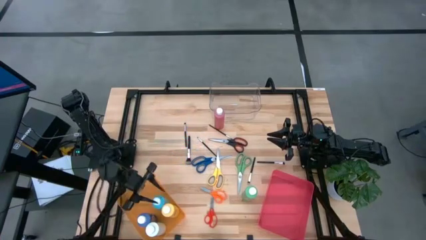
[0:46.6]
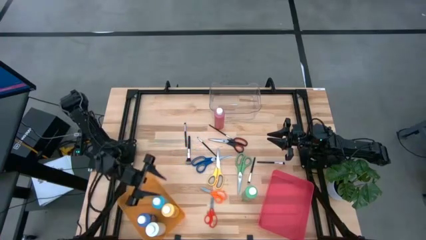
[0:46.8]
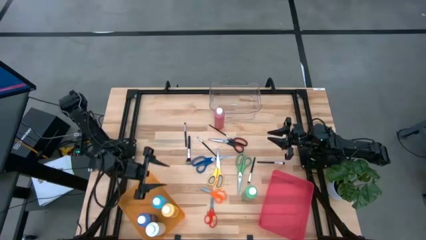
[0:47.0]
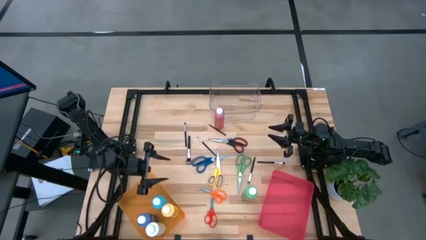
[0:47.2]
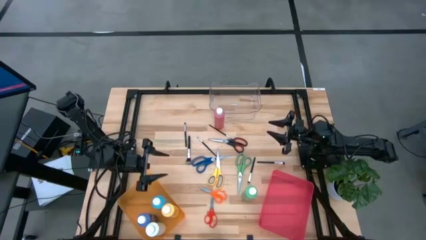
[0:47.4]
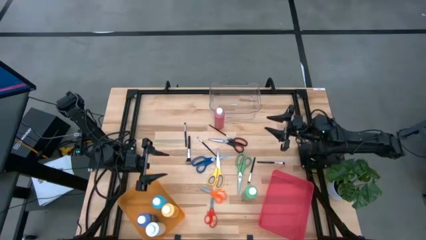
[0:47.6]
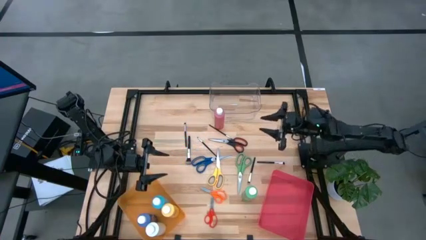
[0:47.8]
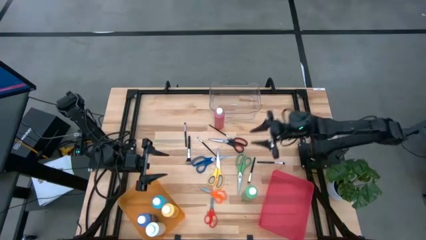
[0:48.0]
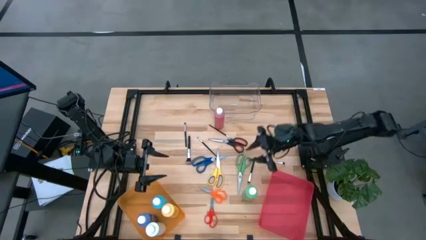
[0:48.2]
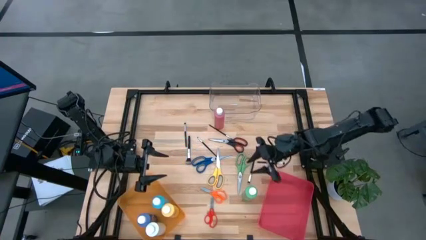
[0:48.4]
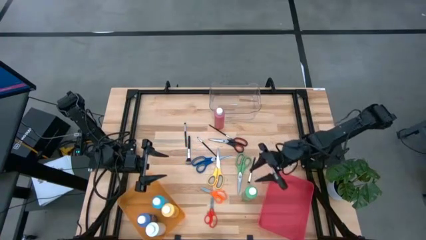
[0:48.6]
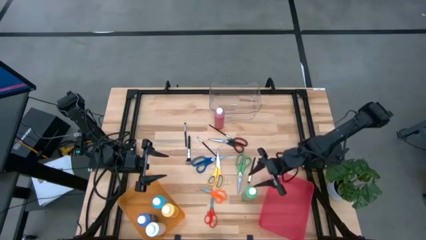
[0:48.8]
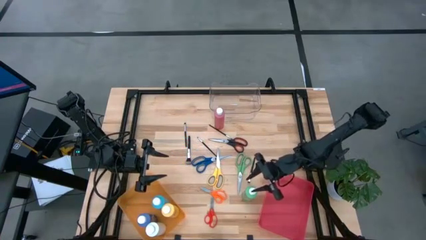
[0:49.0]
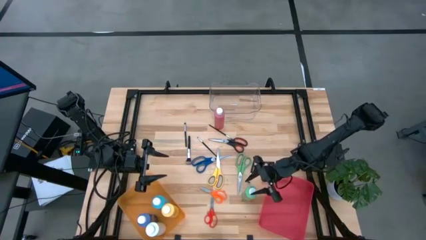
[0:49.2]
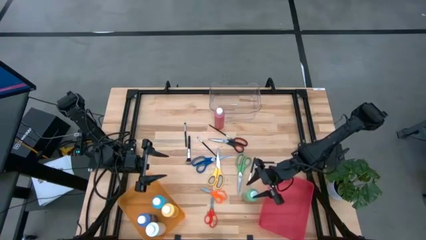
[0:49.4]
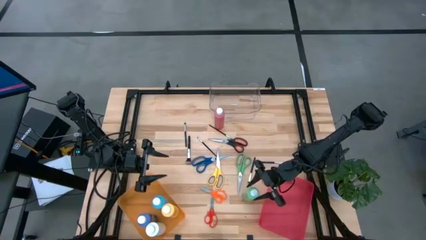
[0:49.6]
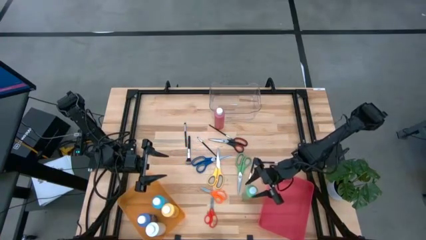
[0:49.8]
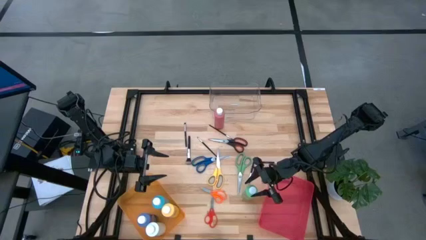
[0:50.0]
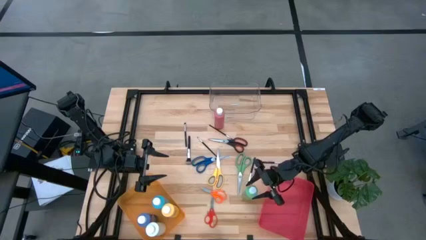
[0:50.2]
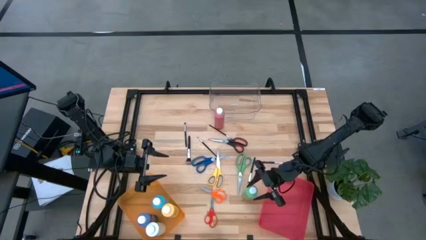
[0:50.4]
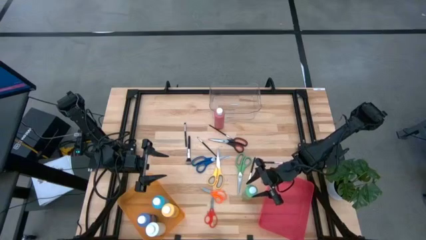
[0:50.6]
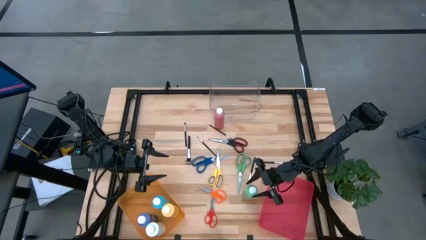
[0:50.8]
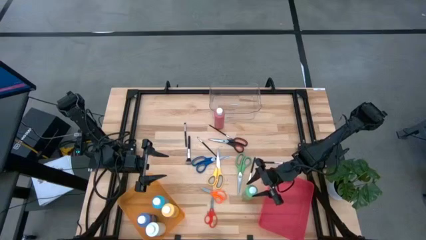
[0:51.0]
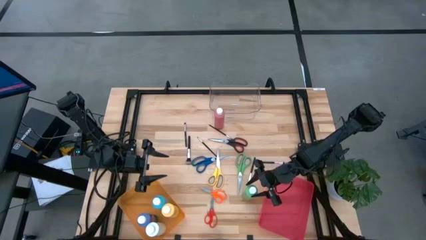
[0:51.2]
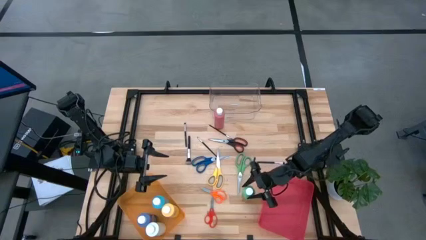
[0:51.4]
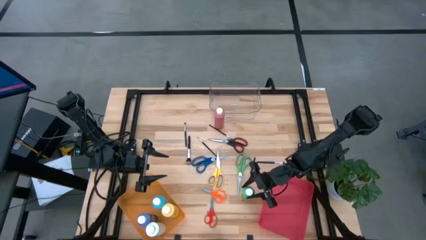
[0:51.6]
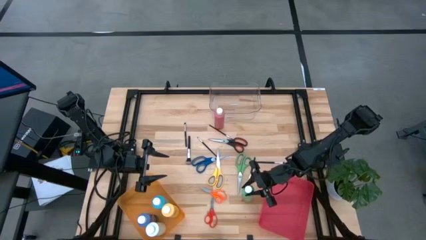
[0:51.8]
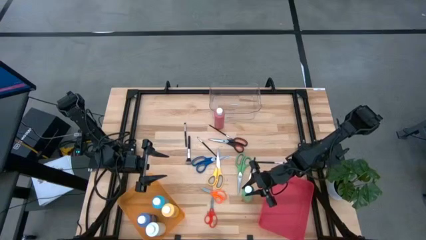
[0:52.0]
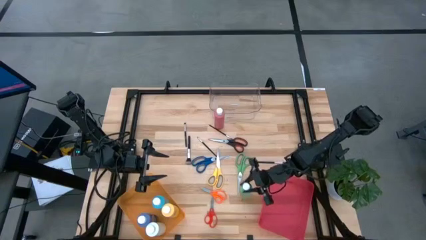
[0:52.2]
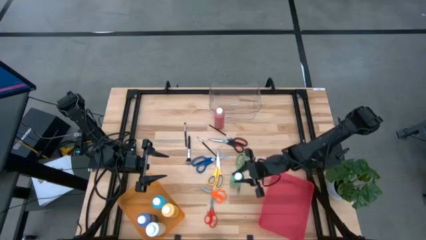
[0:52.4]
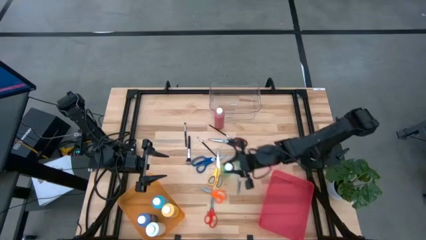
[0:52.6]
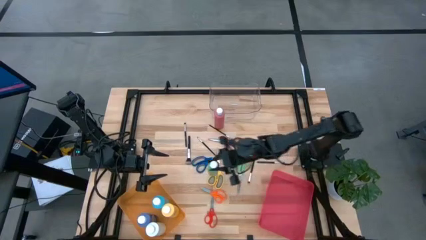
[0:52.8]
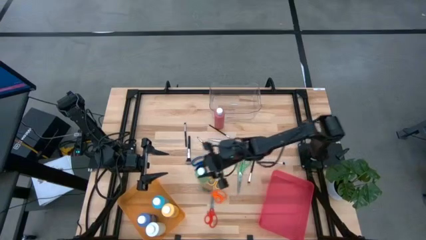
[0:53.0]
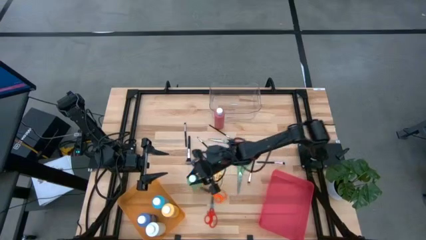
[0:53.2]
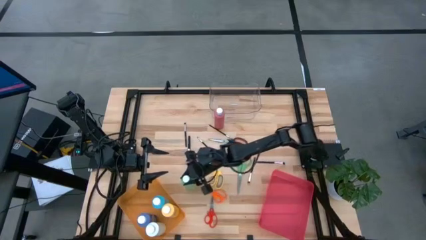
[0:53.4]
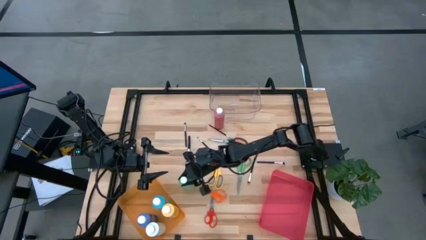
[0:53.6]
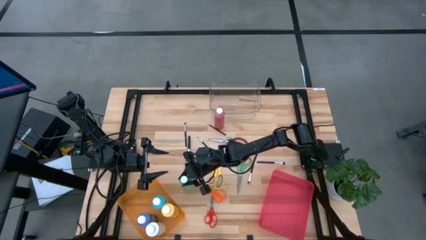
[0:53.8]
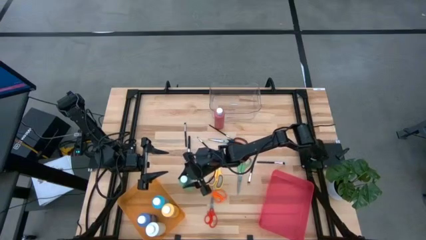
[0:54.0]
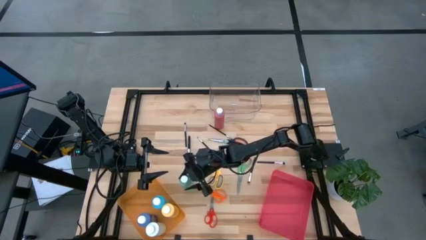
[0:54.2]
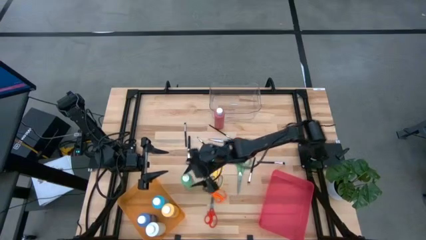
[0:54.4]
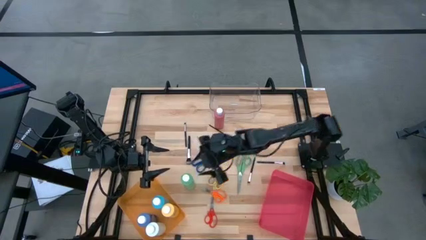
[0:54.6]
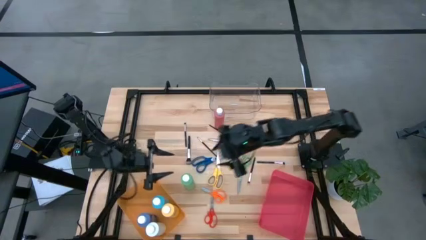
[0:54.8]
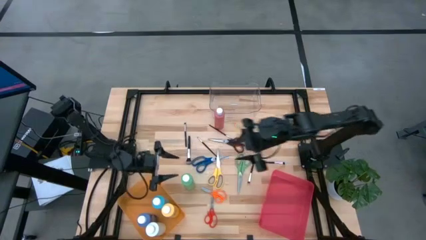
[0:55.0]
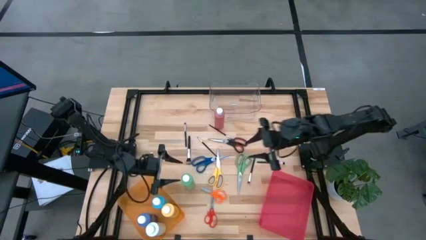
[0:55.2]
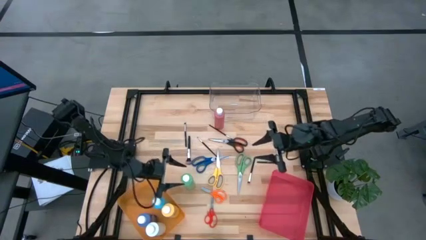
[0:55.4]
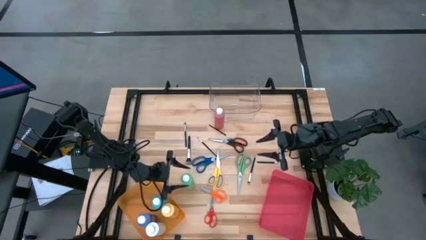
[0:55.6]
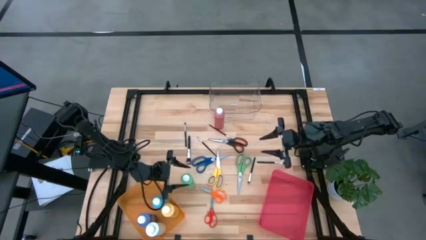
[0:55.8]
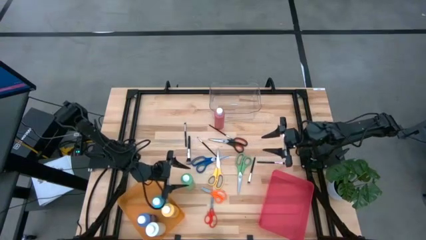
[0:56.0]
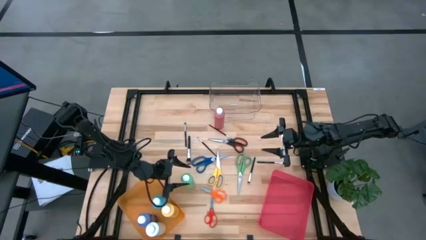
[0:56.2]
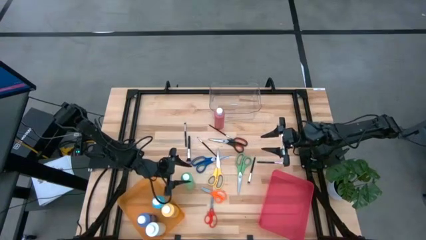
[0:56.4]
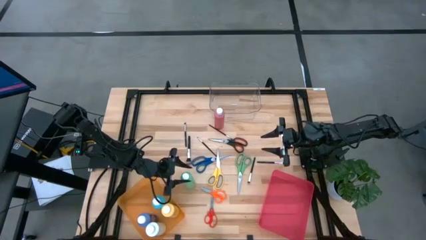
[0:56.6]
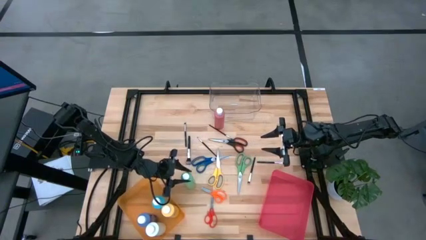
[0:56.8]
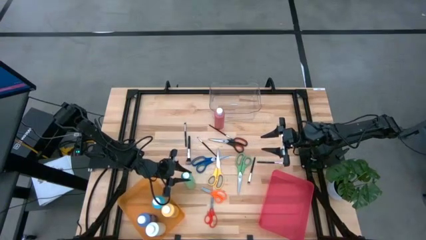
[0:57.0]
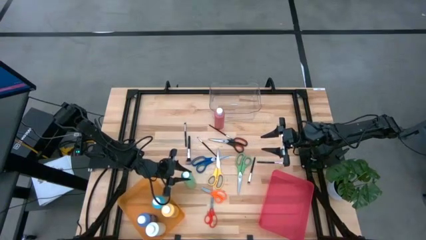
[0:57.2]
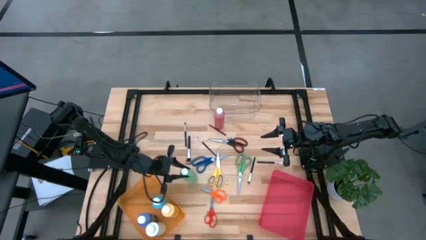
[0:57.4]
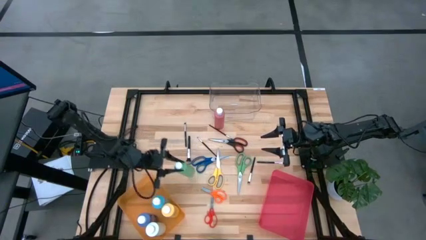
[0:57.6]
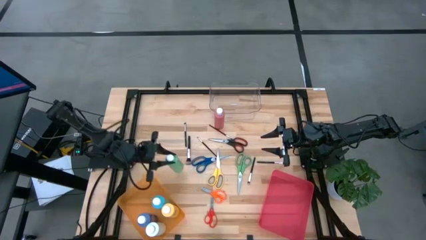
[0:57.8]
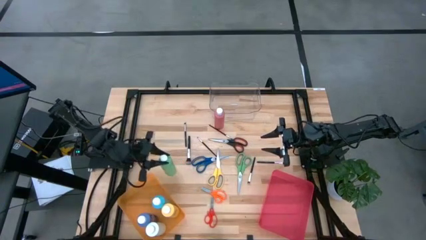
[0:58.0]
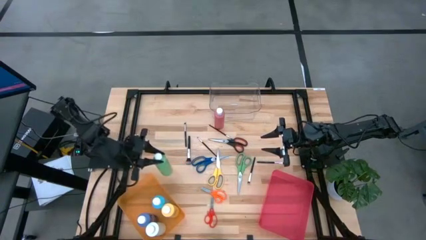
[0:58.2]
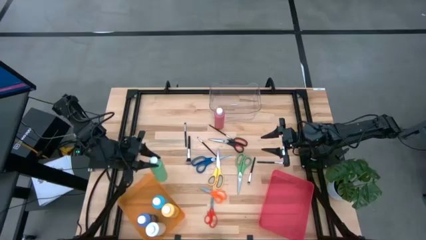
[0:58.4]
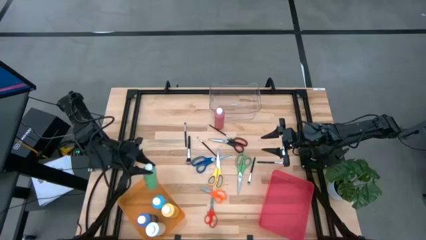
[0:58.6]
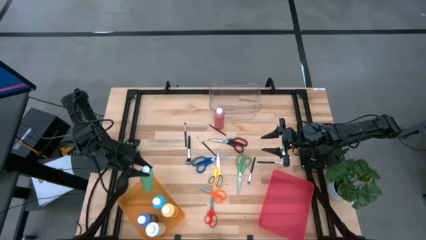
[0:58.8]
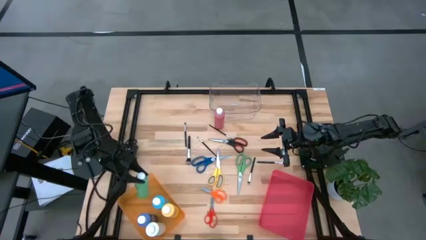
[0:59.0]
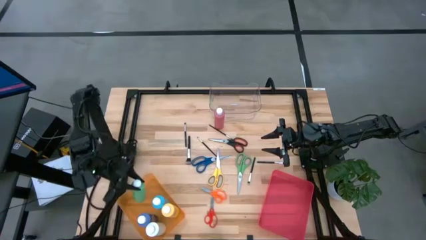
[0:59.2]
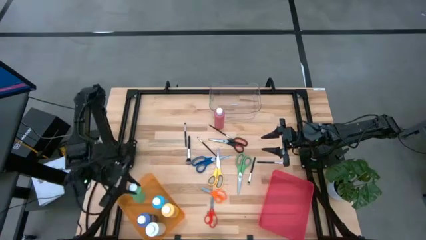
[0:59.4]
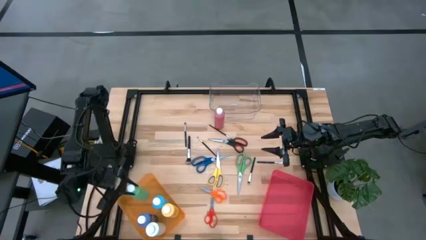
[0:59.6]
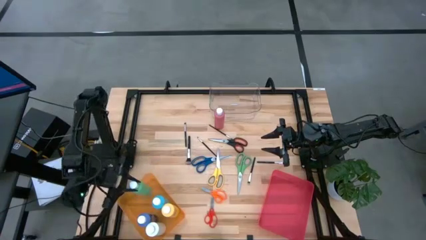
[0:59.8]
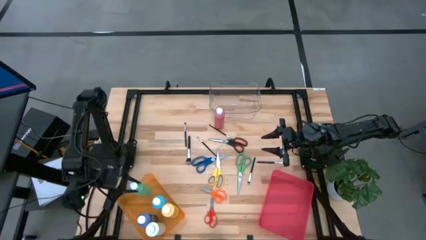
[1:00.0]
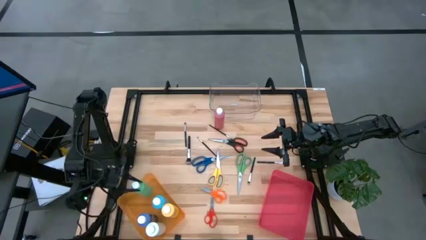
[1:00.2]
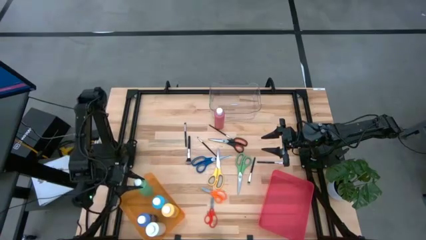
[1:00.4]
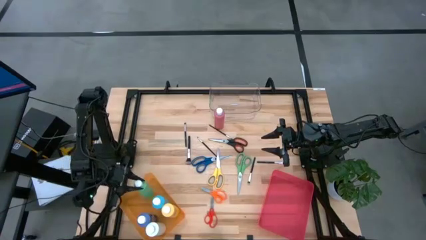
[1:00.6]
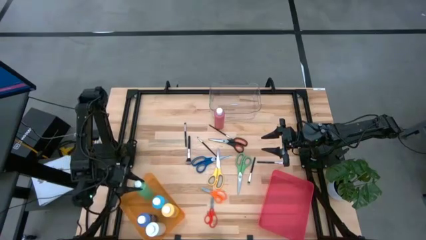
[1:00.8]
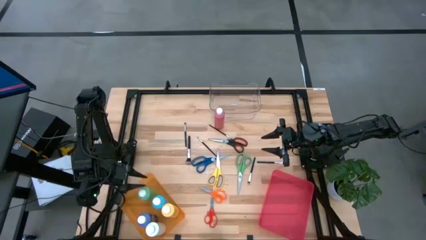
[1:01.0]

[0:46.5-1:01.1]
Task: Pick & Place Paint Supplies
Put the green paint bottle into the orange bin
